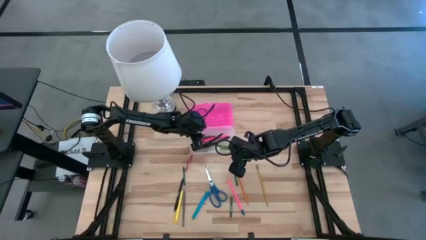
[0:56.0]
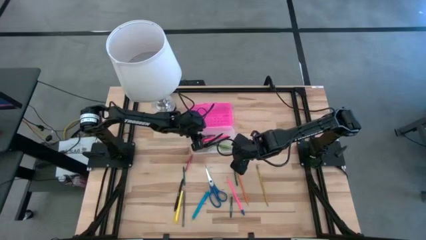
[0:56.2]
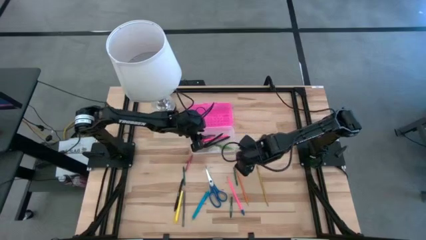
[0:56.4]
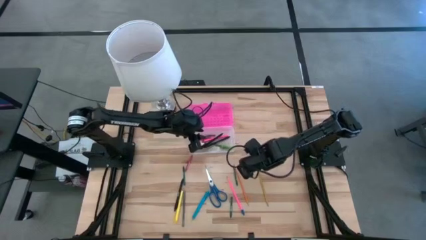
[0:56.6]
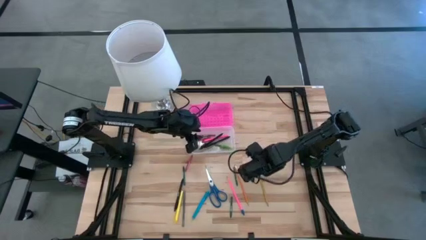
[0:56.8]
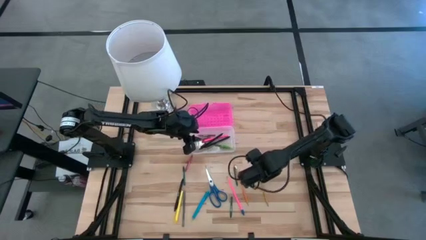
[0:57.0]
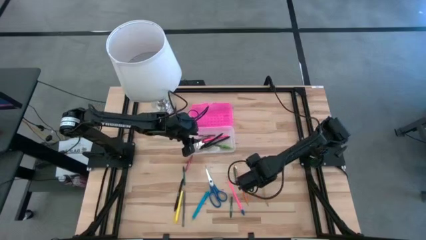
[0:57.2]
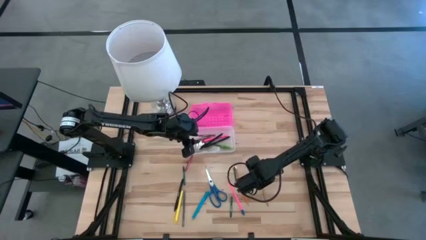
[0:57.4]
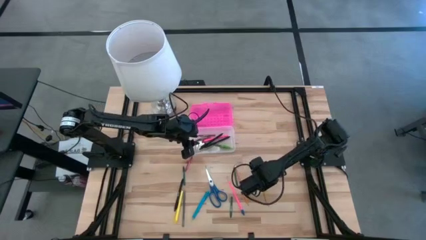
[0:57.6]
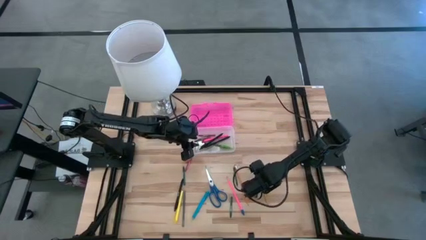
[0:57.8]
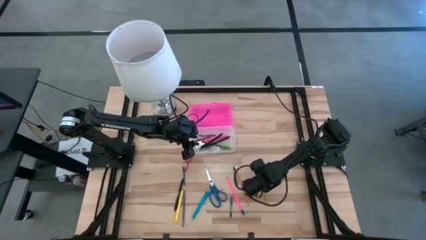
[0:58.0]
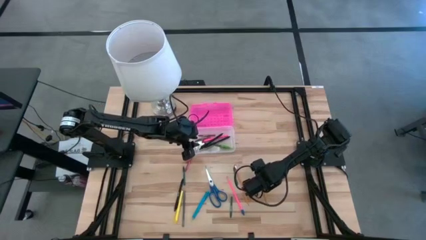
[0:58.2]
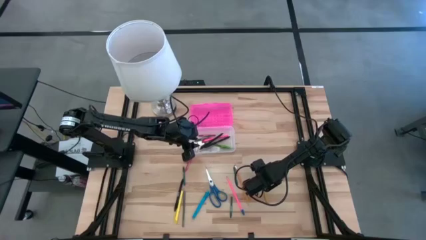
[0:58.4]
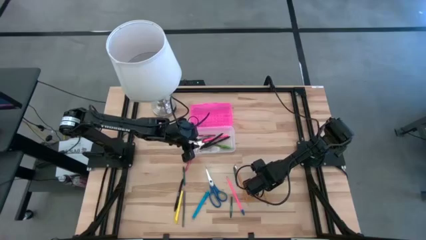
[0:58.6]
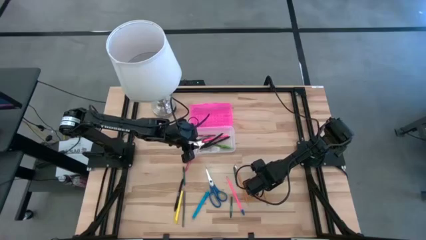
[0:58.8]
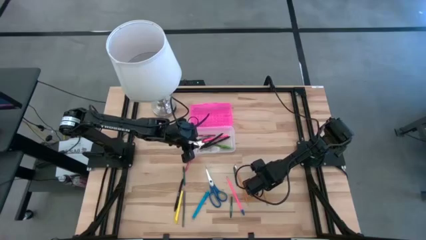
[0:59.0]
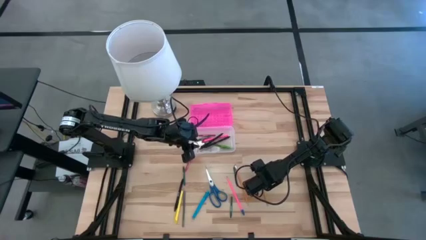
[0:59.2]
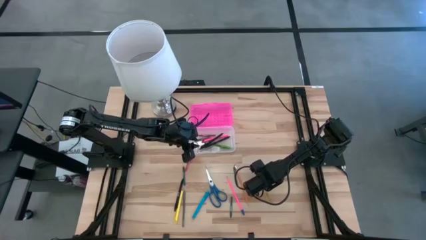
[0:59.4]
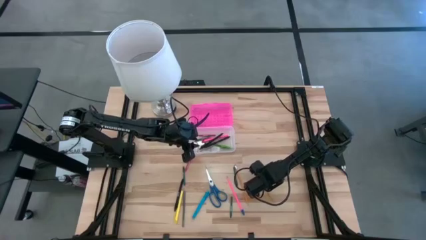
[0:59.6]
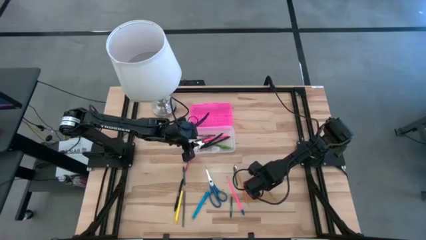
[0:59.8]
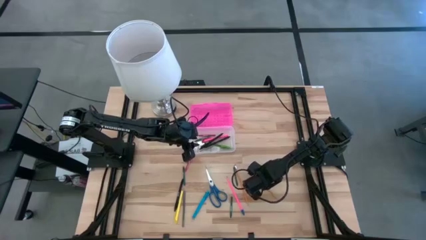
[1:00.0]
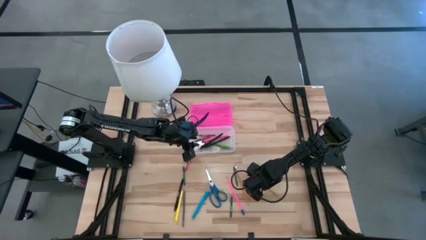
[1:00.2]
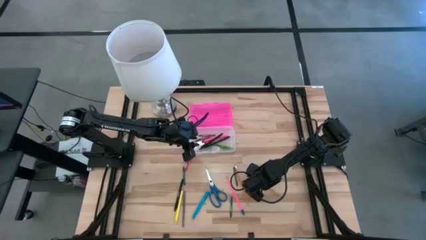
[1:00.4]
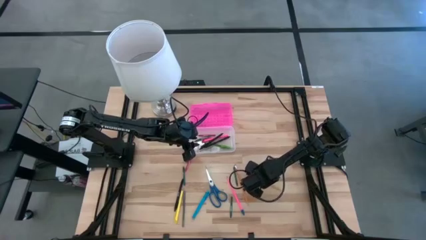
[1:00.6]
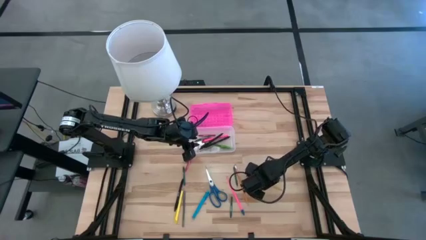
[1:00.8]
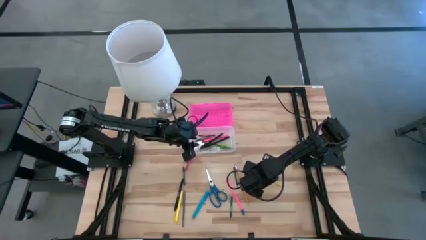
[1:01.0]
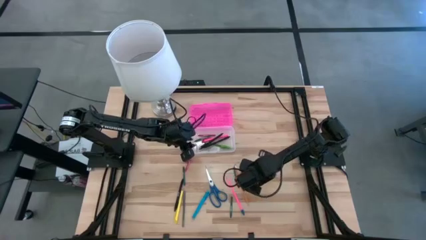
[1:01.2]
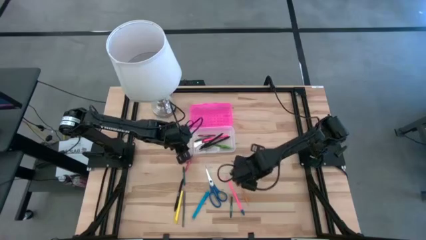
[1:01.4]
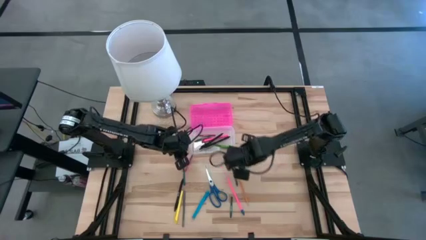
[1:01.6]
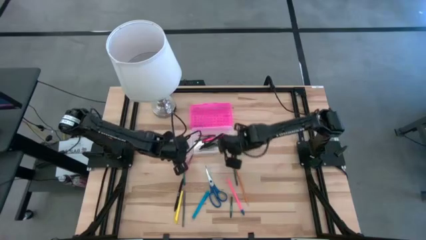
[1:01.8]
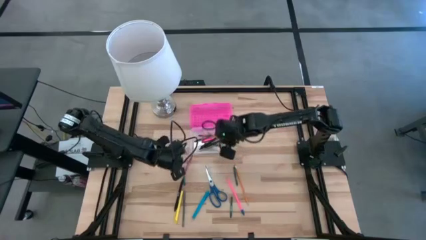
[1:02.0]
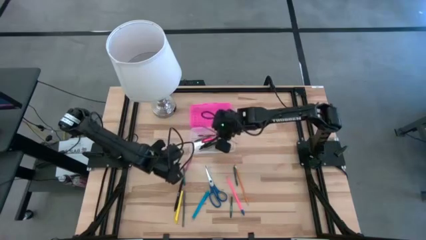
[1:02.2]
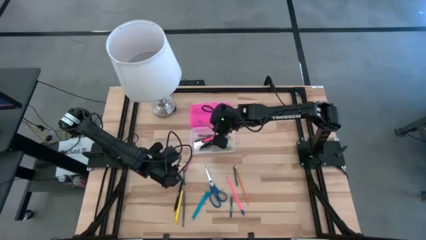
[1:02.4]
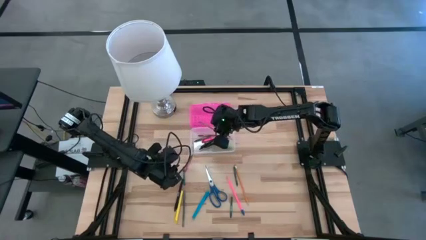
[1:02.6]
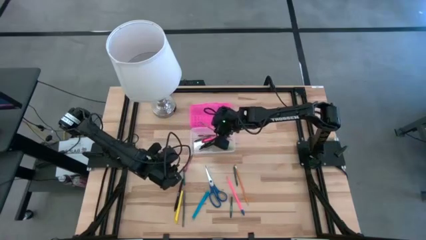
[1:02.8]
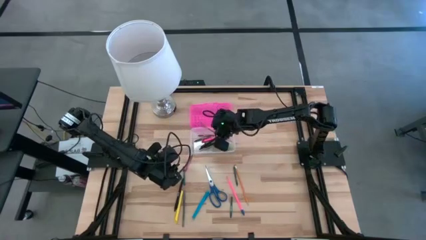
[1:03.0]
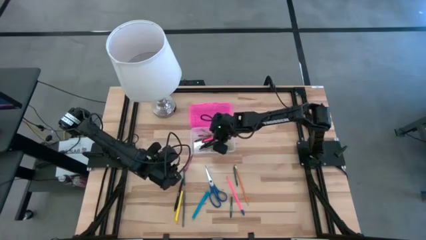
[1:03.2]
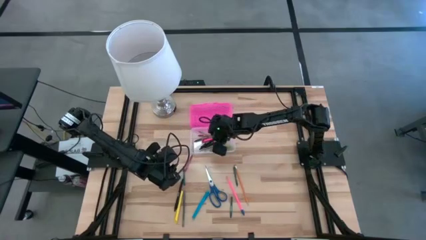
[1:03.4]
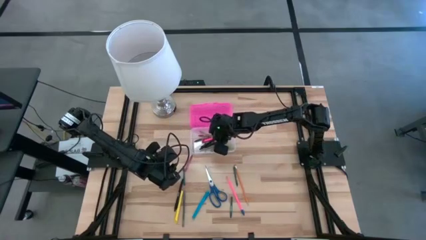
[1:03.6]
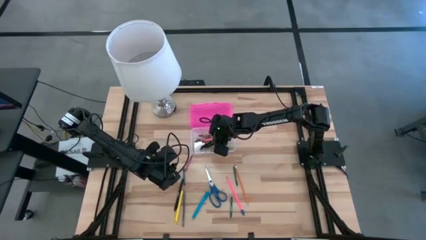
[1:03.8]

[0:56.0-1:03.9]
Task: Pick & place school supplies into a supply box
Put the light yellow pencil into the supply box

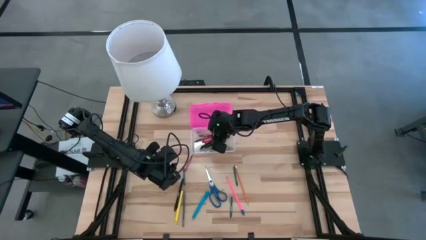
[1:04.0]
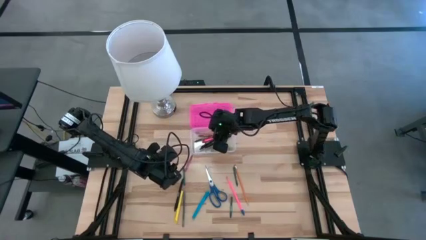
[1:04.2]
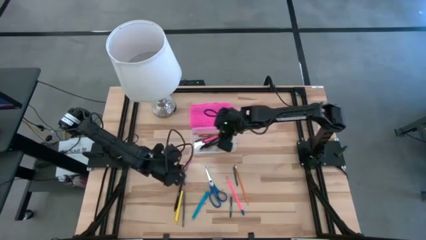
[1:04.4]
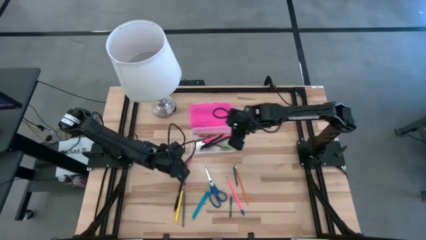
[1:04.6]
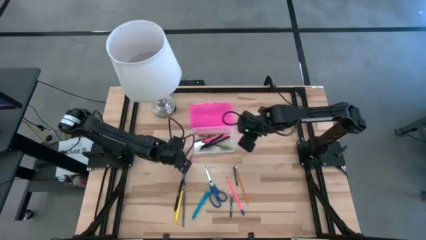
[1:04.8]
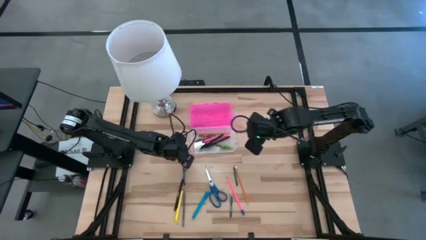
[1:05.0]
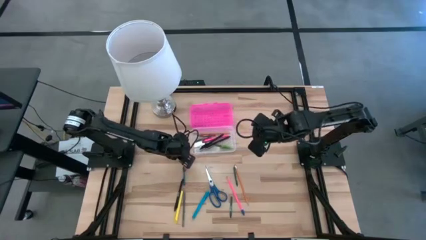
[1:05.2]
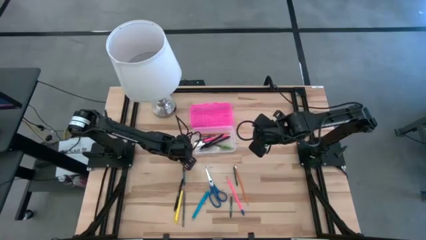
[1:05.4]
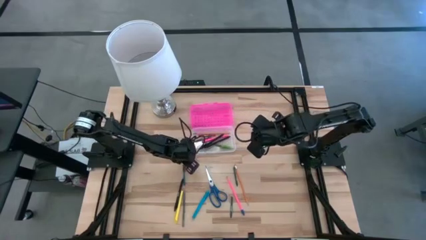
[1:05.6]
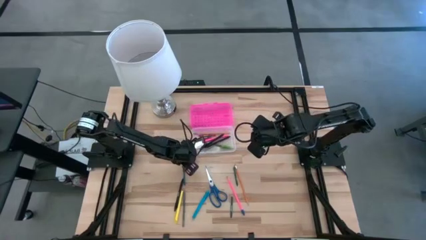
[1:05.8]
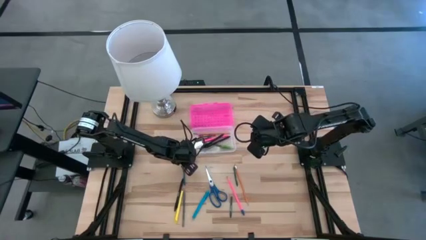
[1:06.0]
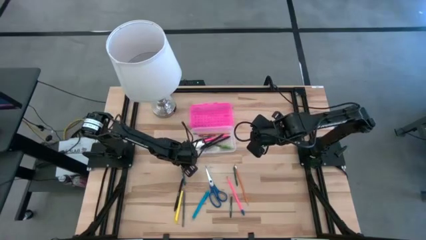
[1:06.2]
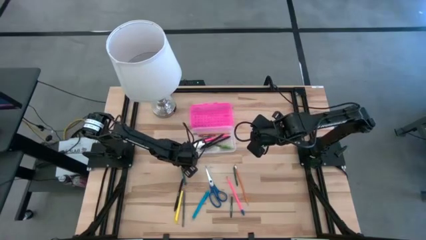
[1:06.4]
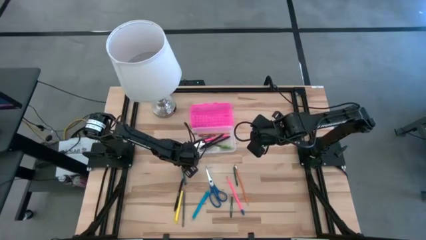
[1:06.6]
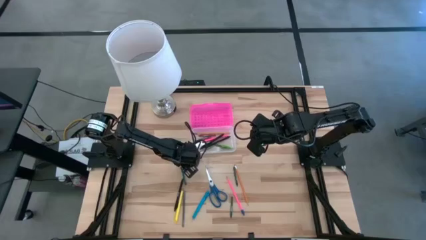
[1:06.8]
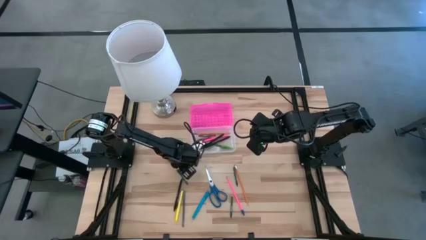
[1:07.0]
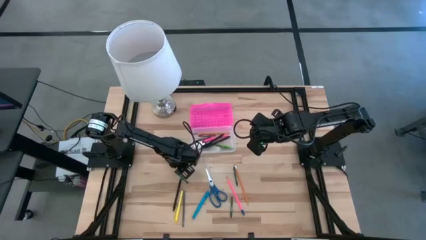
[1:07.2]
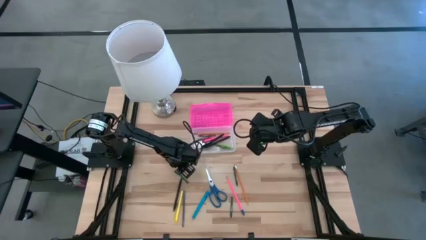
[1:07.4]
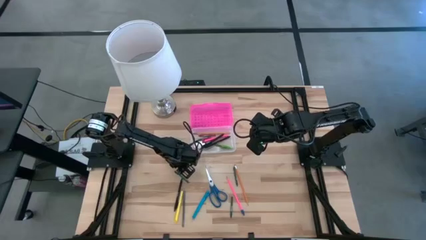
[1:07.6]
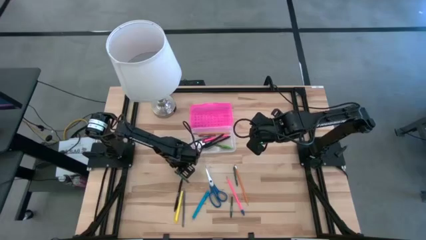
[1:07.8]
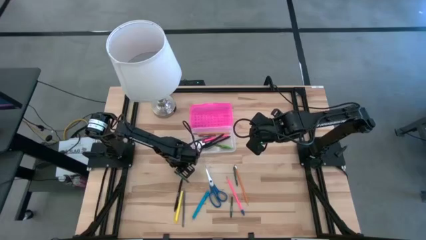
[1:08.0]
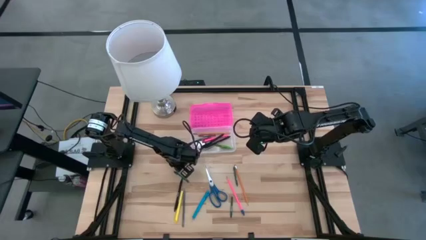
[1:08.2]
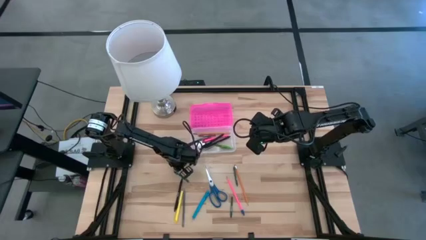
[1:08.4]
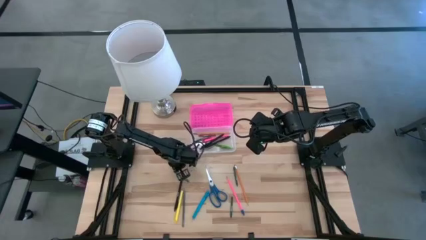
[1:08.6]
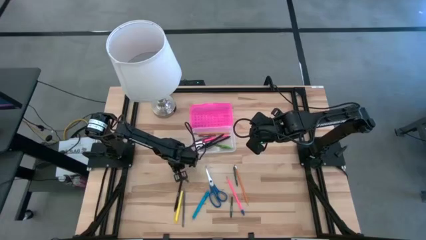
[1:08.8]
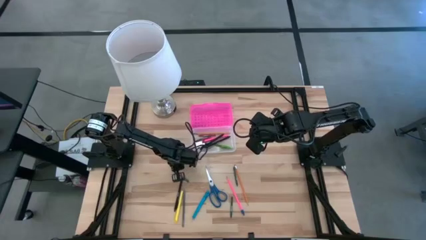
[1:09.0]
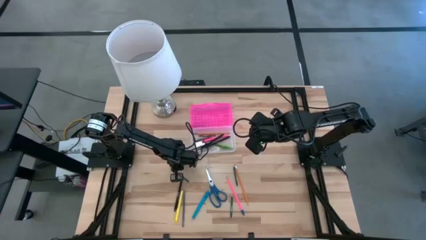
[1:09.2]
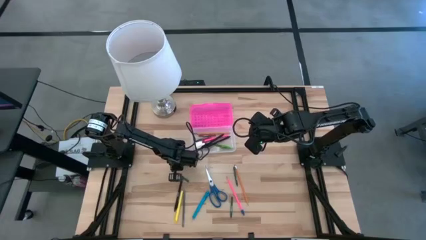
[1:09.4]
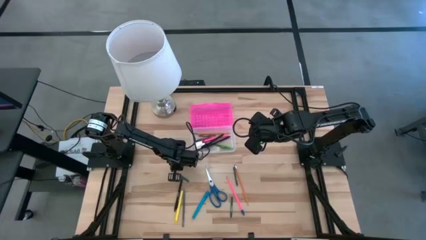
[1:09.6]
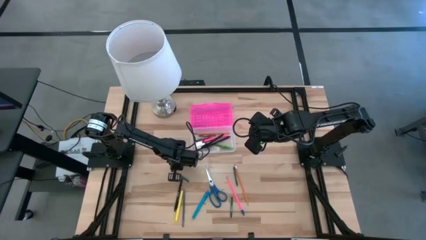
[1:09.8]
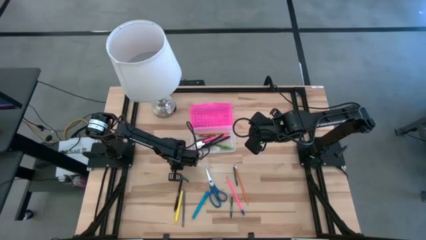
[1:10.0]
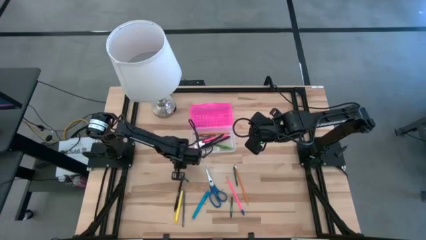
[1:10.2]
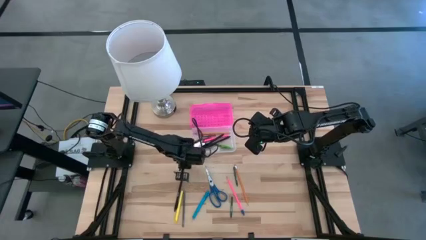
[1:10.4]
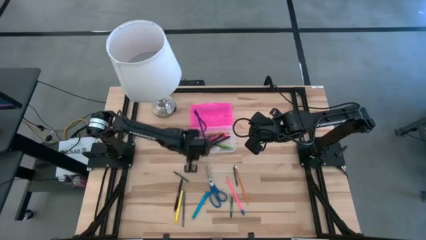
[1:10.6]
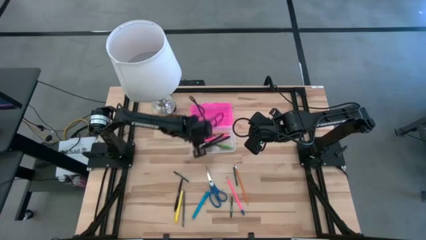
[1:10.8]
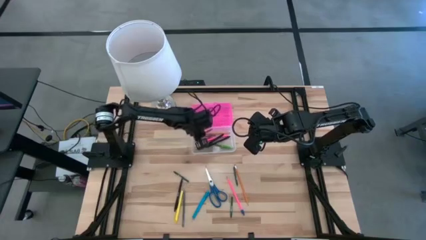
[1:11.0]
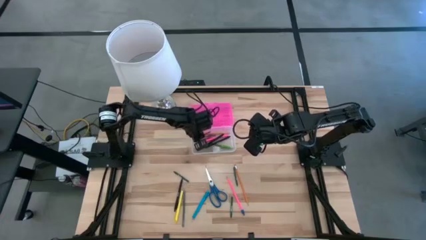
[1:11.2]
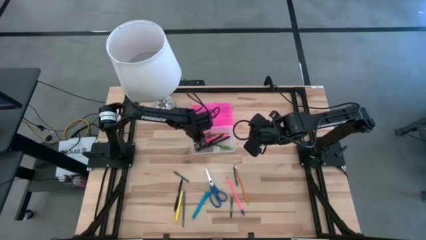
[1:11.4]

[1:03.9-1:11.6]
Put the red crayon into the supply box

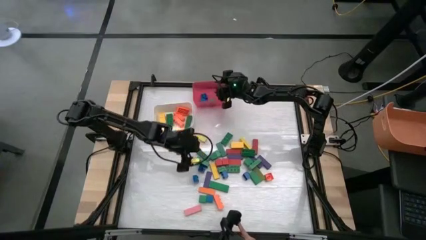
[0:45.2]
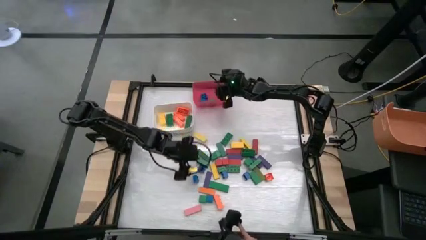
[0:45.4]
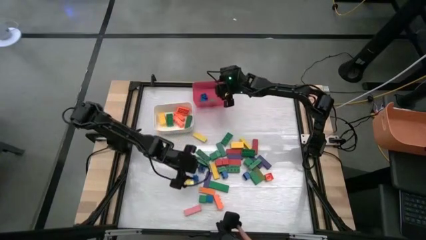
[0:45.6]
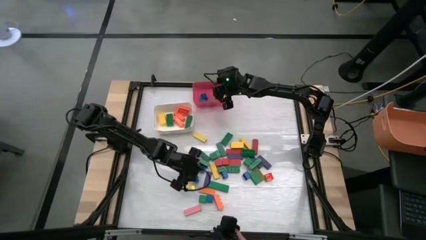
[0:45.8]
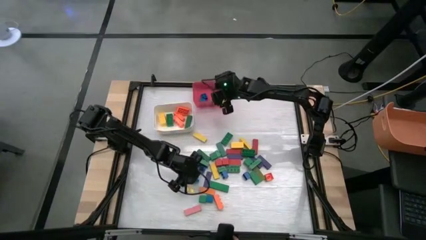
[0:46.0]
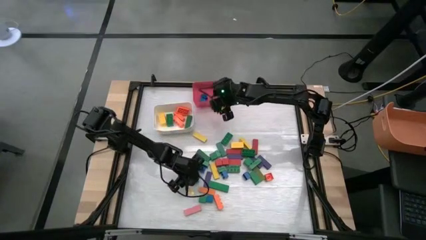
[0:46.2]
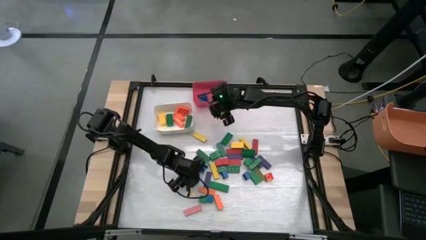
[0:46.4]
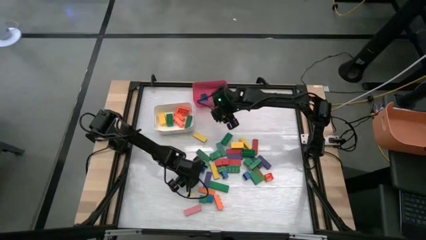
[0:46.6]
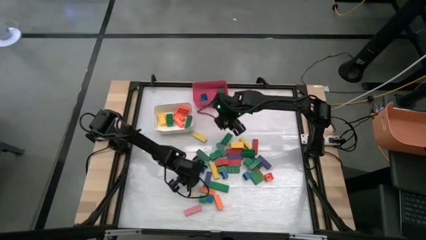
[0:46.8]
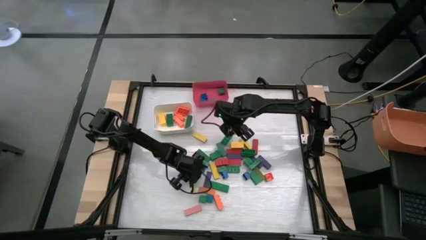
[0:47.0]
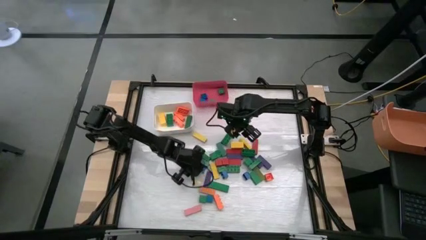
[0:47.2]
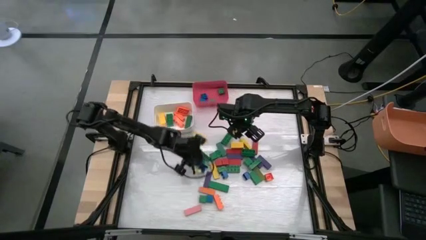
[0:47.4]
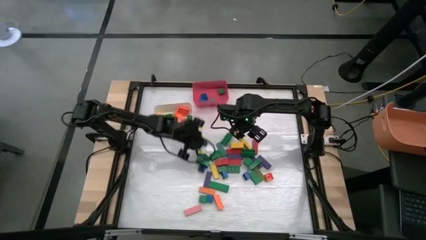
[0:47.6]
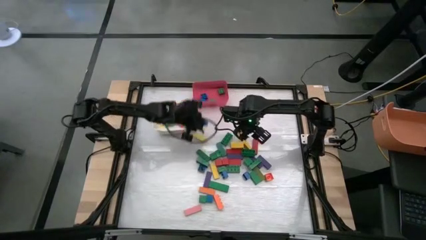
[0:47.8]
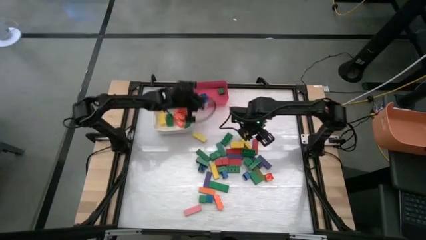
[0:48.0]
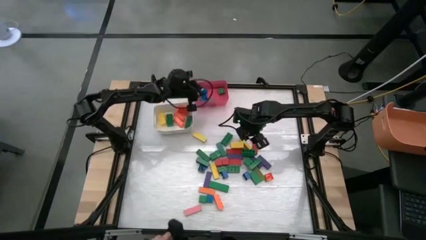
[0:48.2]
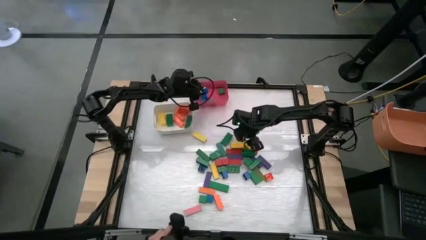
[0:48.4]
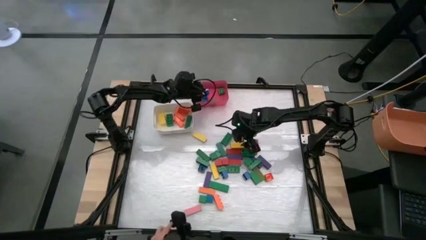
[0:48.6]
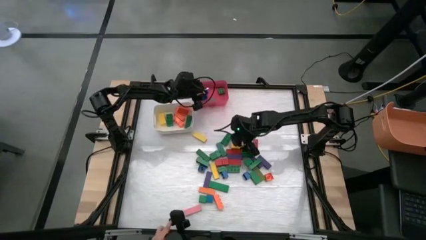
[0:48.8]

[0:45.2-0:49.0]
Task: Sort blocks by size
Put the small blue game piece into the red bin
